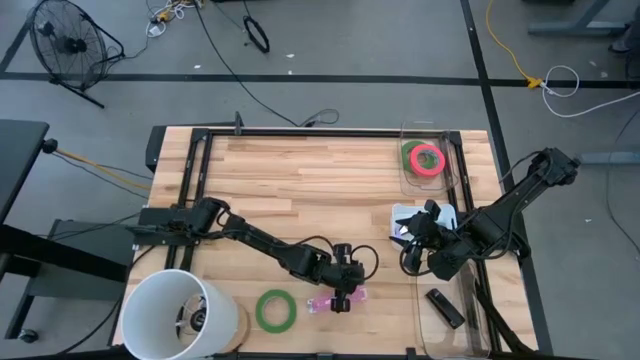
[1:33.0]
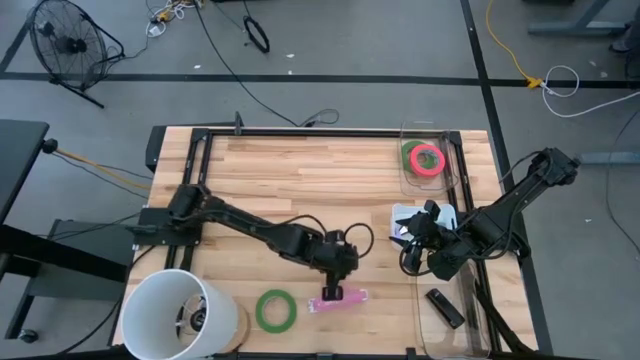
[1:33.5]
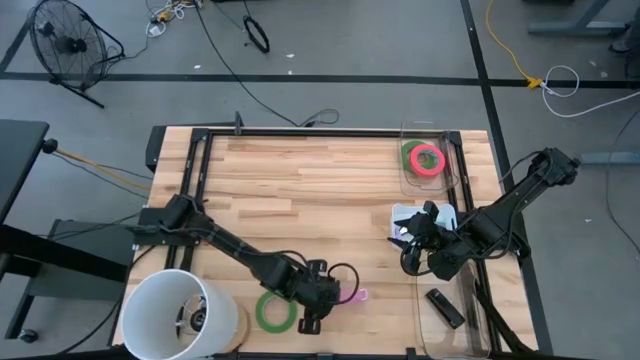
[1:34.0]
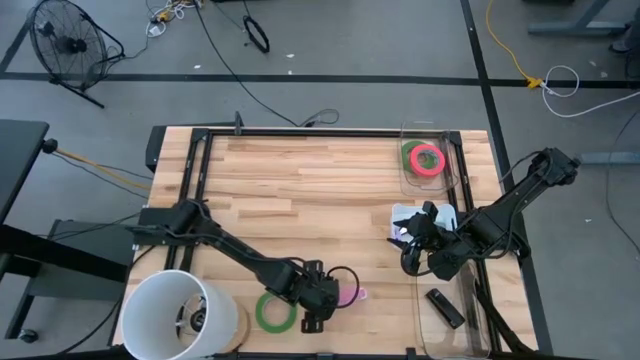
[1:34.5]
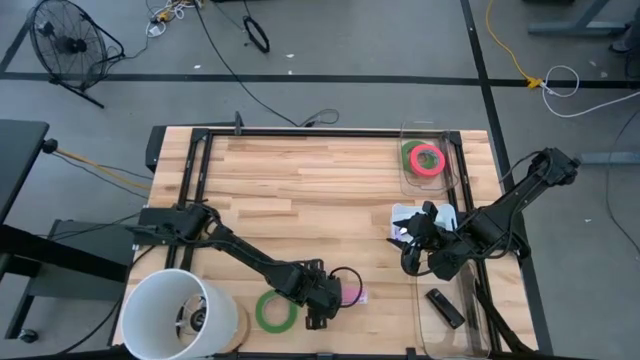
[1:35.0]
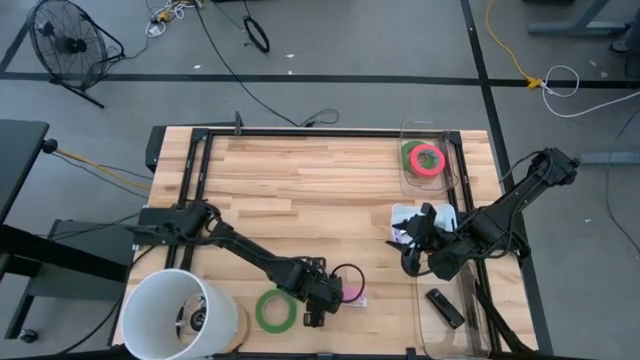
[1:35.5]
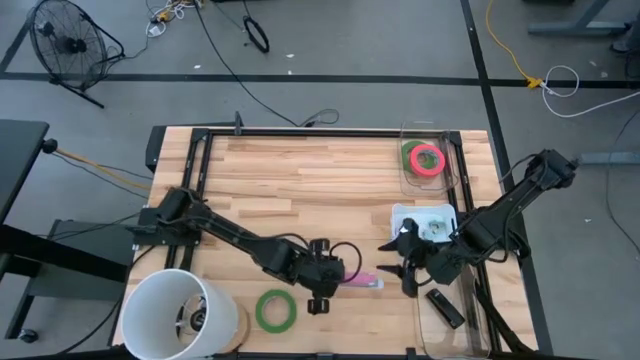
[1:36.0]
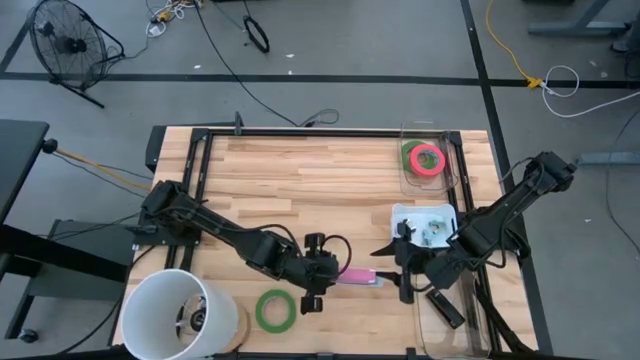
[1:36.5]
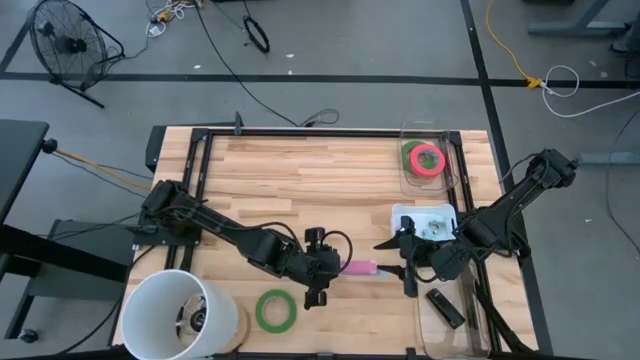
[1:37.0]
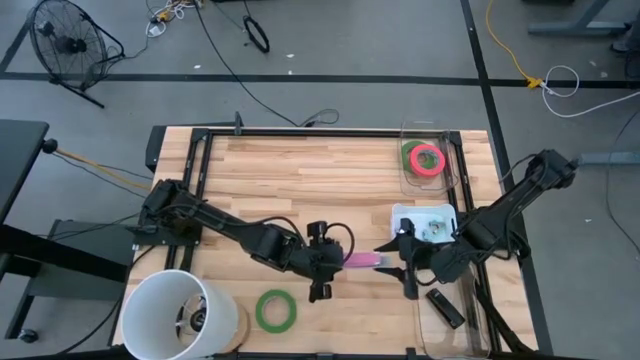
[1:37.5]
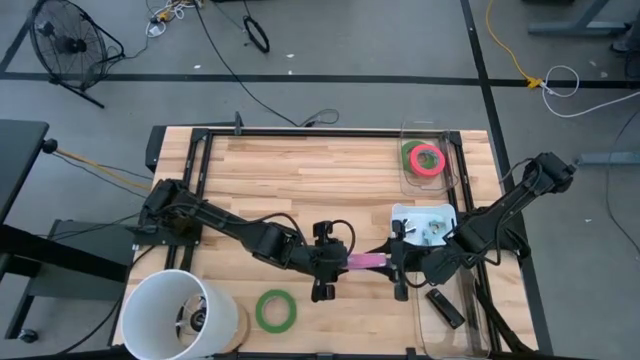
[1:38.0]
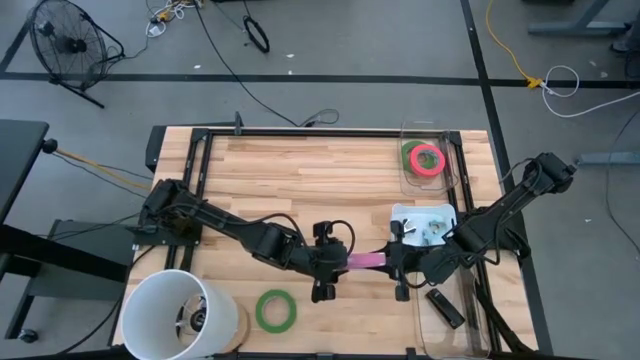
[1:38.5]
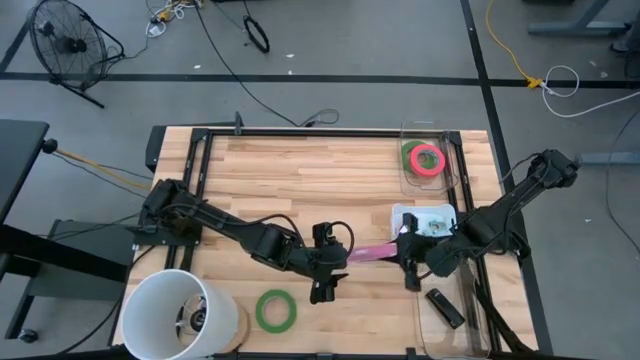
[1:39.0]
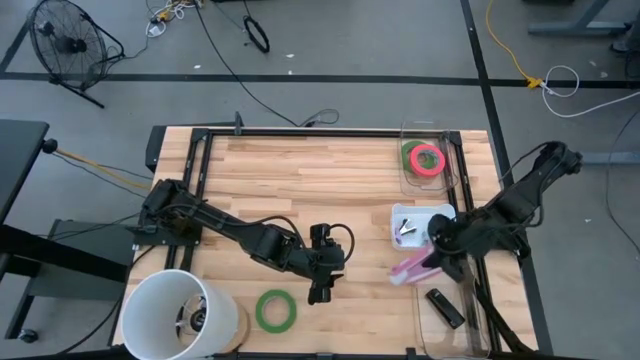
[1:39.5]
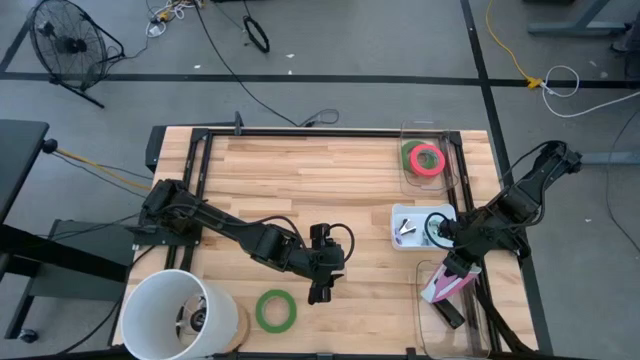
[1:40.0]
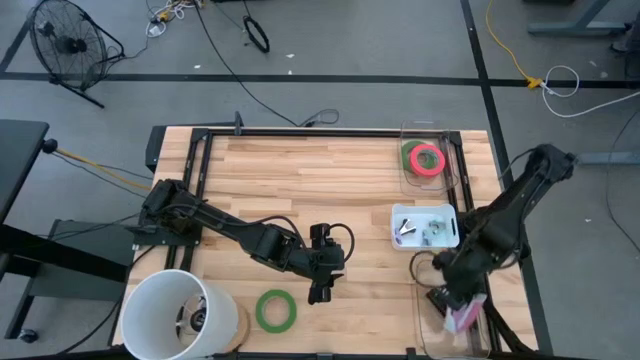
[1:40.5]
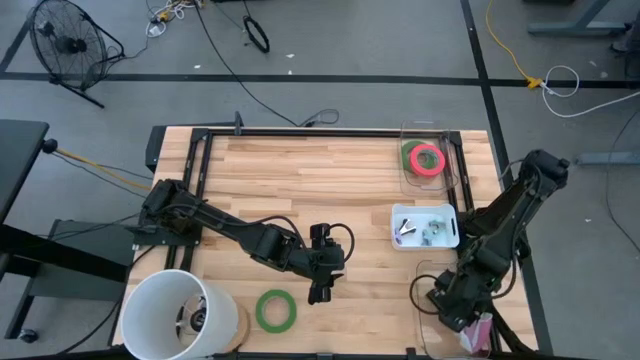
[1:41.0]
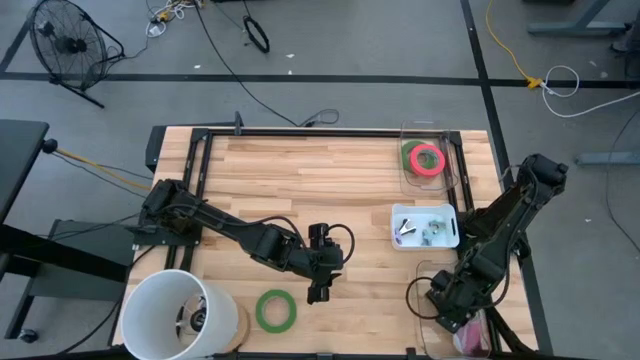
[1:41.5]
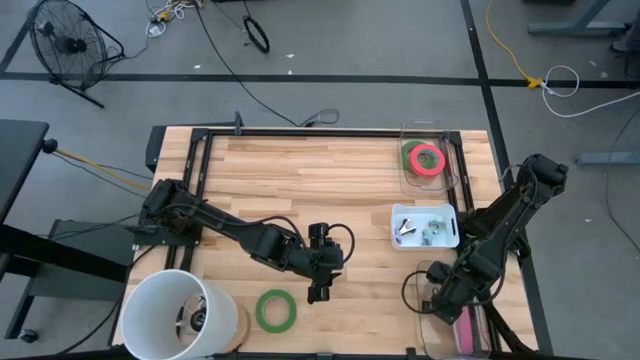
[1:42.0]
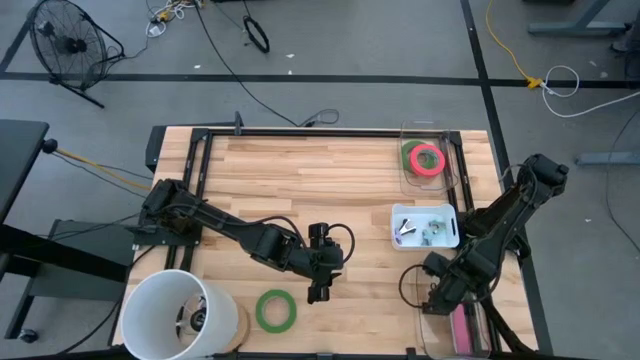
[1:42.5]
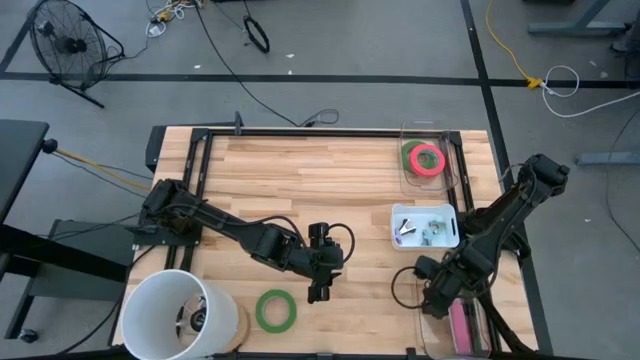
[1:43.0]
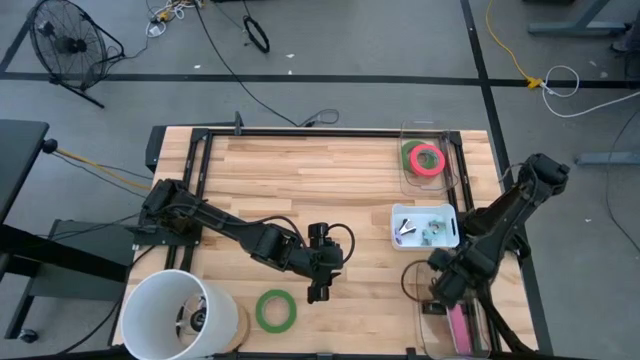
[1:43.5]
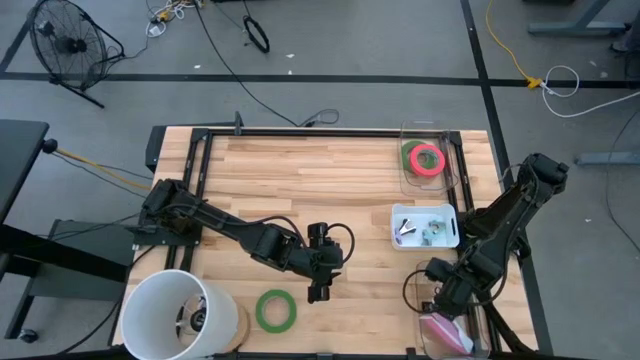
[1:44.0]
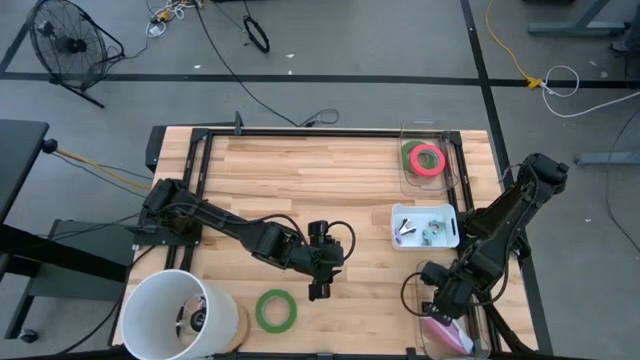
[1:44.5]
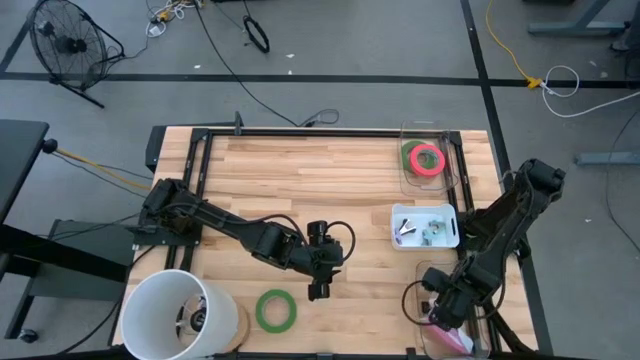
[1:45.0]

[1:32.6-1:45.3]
Task: Pick and place Stapler, Stapler remover, tape
Put the pink stapler into the bottom transparent bin

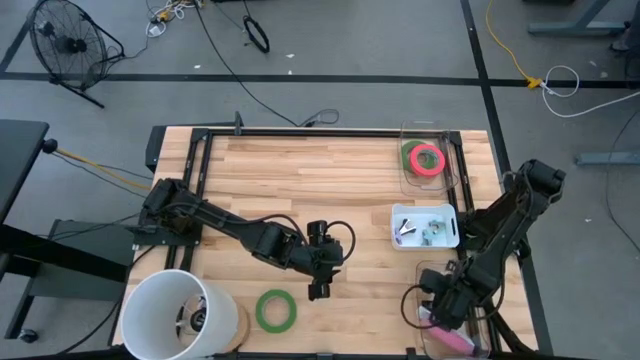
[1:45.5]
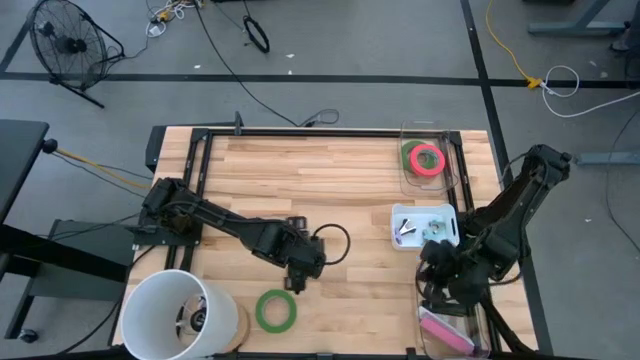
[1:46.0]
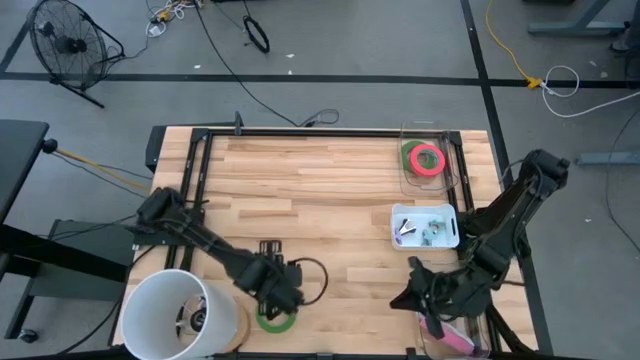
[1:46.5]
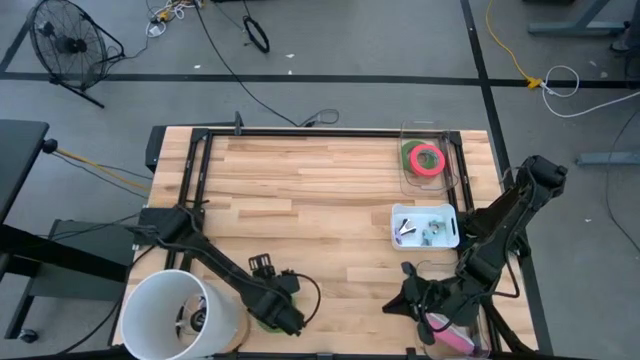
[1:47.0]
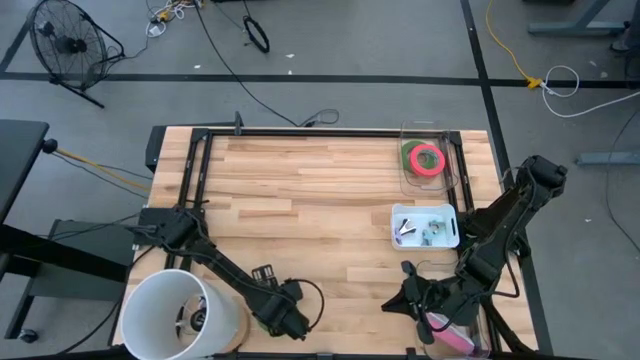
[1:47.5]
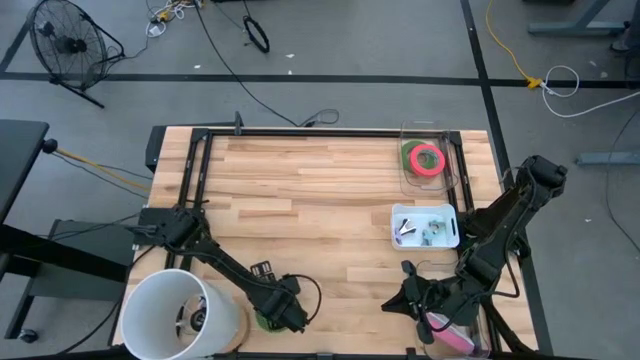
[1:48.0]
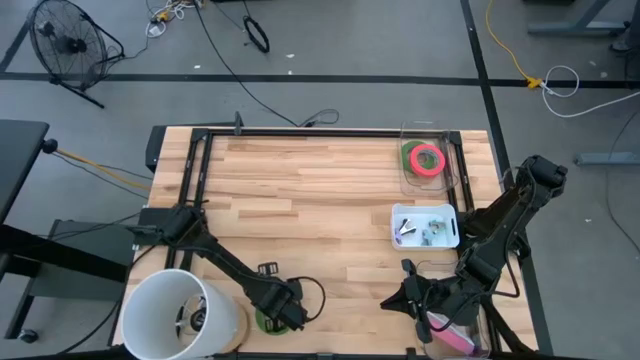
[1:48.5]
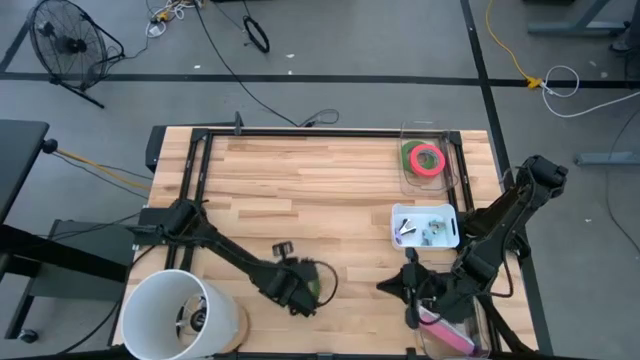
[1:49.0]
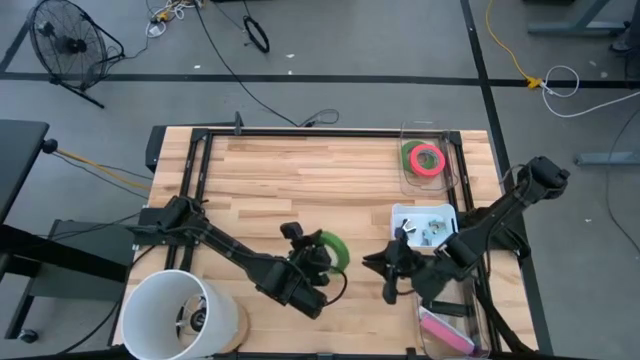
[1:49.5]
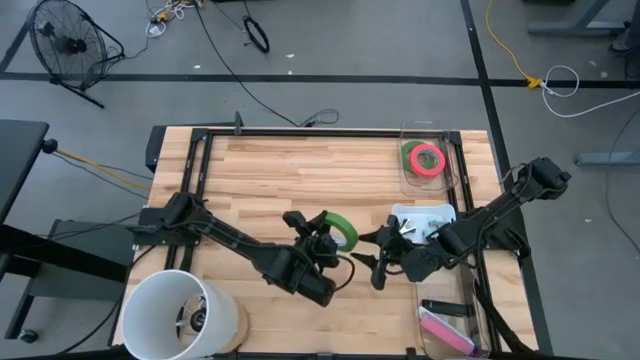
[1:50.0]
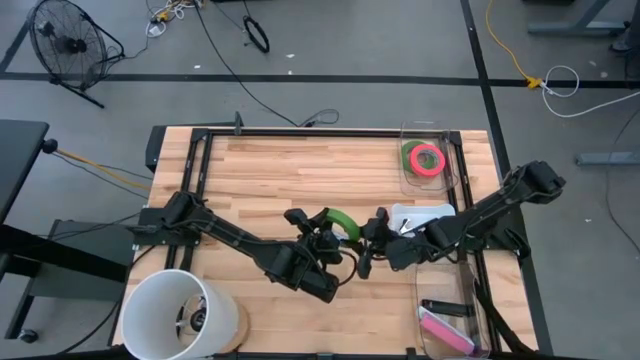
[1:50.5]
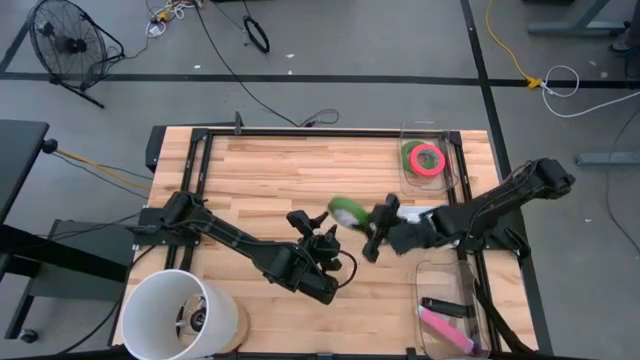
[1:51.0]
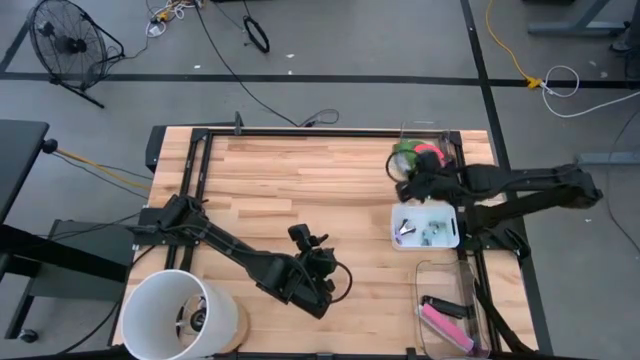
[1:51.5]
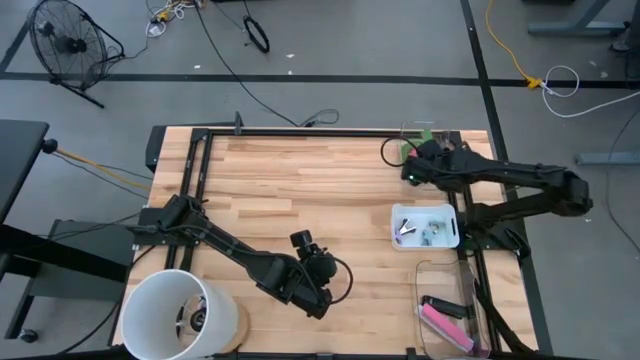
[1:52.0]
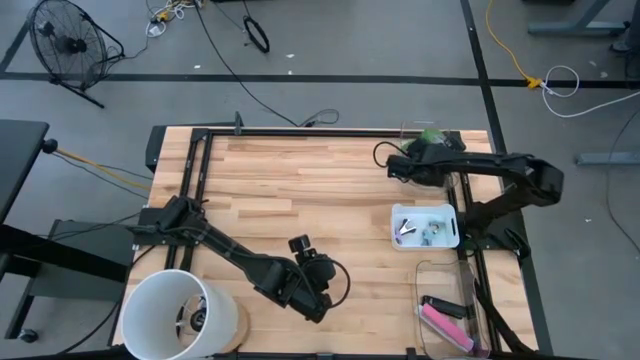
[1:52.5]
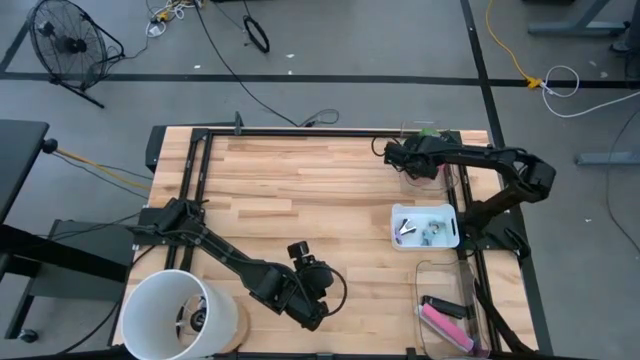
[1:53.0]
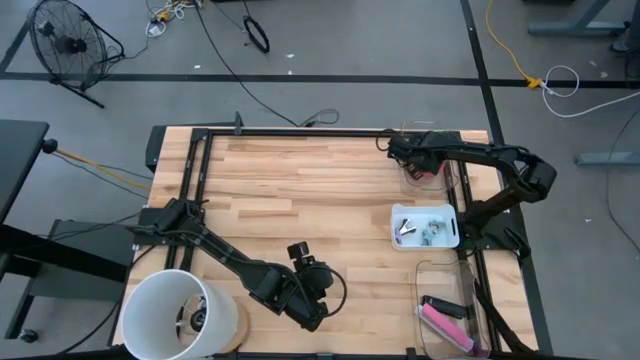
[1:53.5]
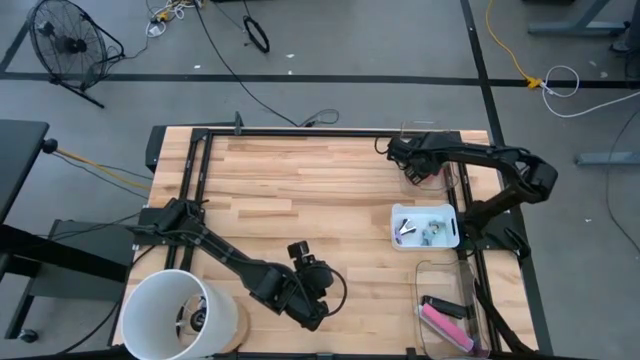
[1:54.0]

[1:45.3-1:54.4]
Put the green tape into the top transparent bin
